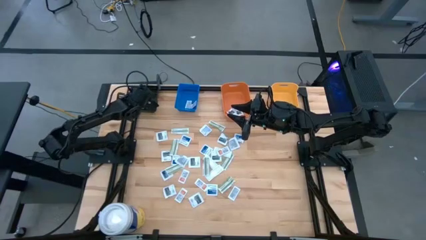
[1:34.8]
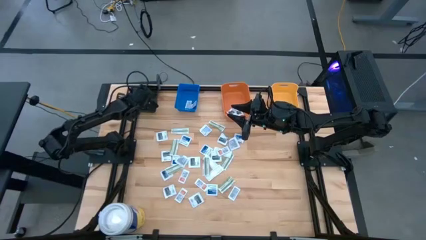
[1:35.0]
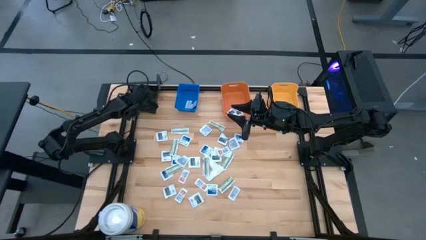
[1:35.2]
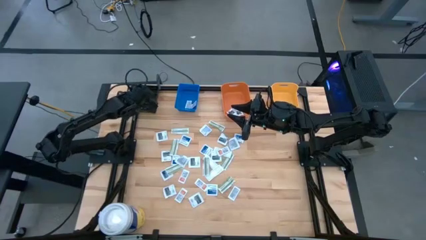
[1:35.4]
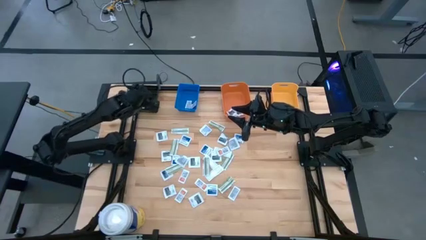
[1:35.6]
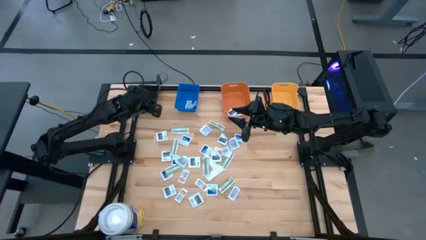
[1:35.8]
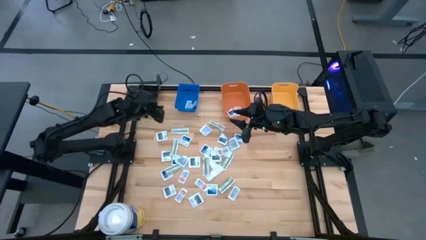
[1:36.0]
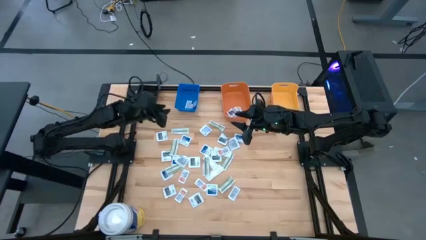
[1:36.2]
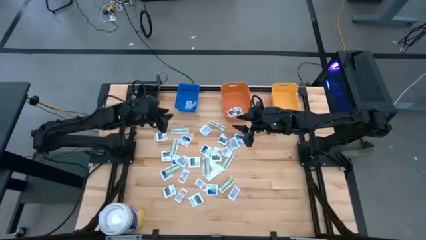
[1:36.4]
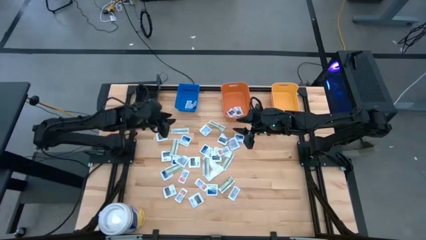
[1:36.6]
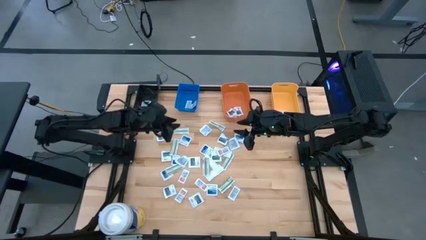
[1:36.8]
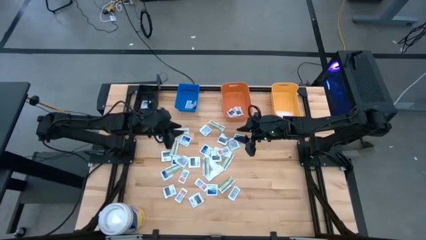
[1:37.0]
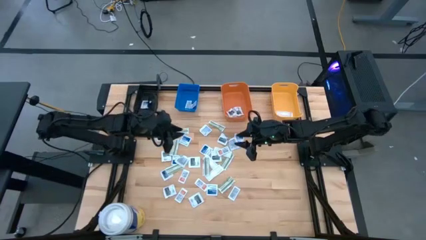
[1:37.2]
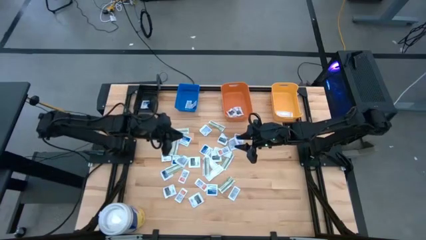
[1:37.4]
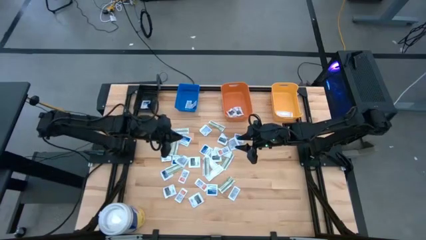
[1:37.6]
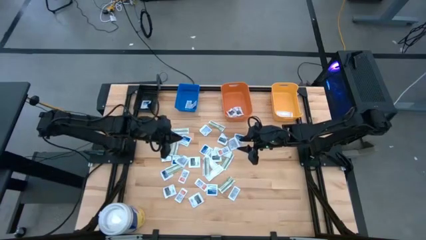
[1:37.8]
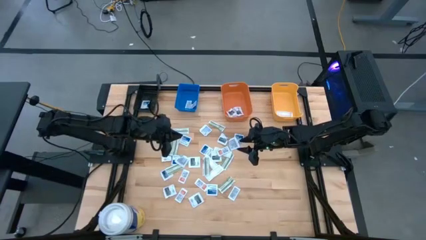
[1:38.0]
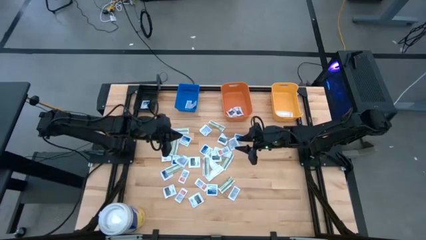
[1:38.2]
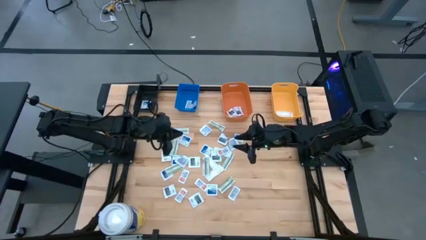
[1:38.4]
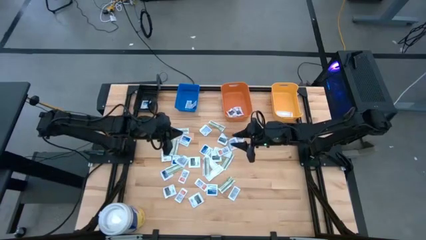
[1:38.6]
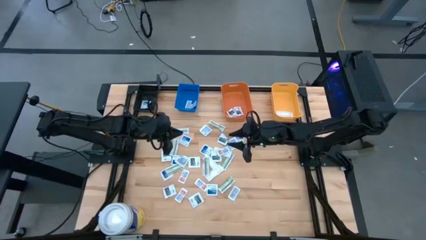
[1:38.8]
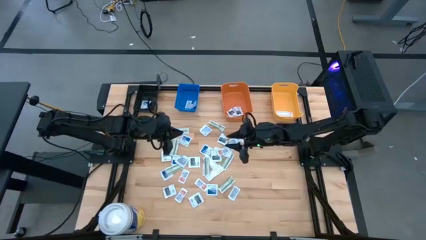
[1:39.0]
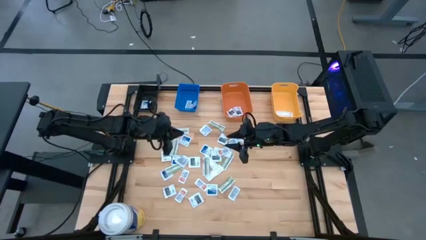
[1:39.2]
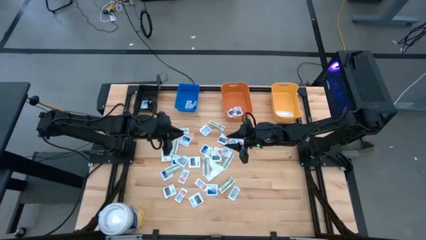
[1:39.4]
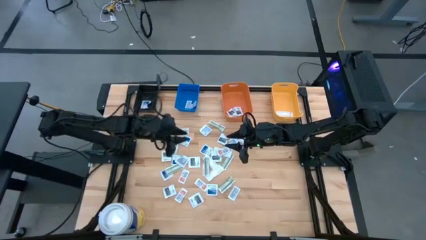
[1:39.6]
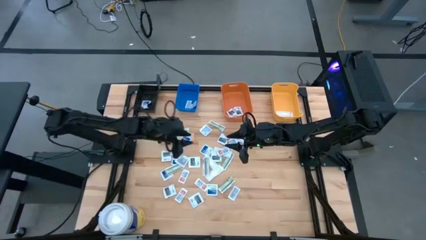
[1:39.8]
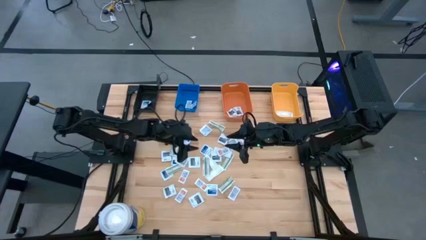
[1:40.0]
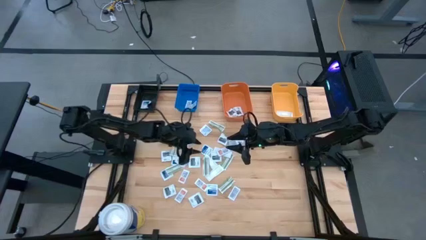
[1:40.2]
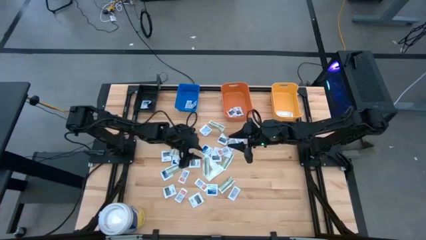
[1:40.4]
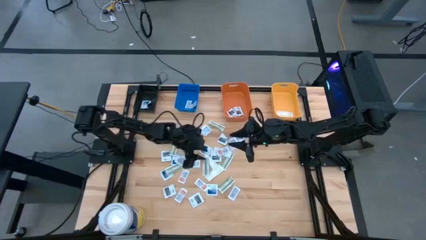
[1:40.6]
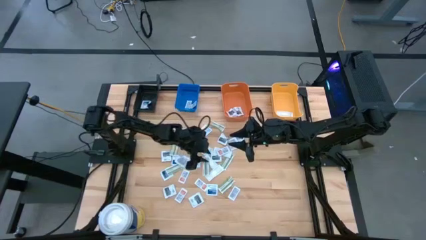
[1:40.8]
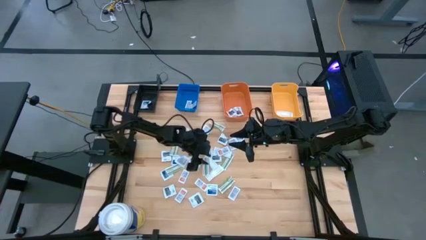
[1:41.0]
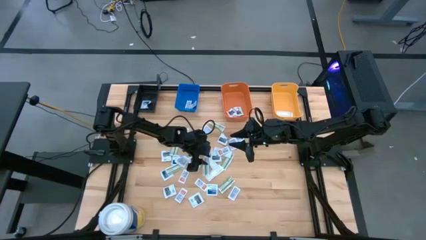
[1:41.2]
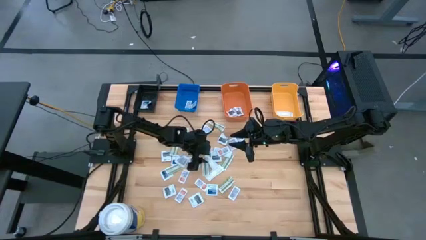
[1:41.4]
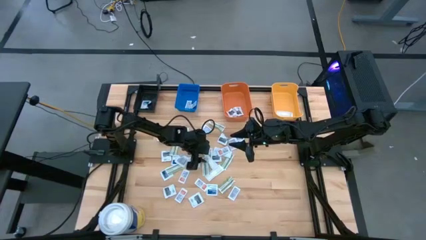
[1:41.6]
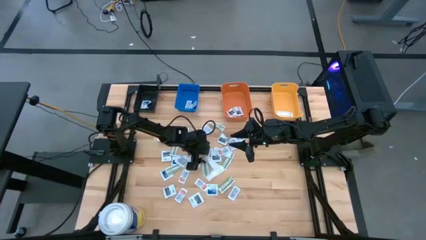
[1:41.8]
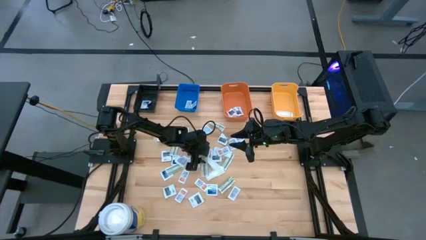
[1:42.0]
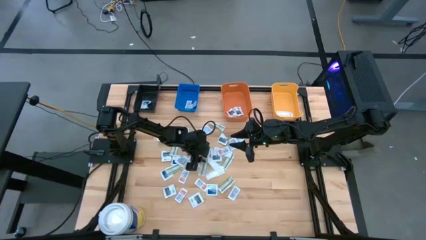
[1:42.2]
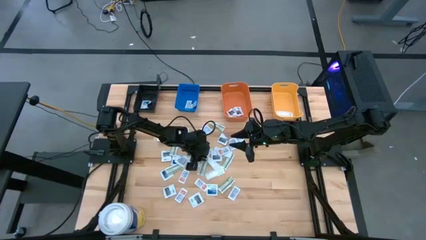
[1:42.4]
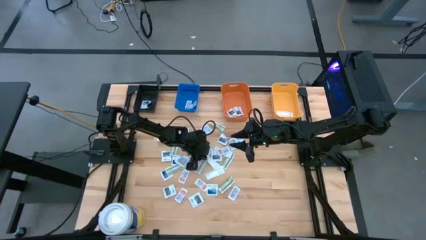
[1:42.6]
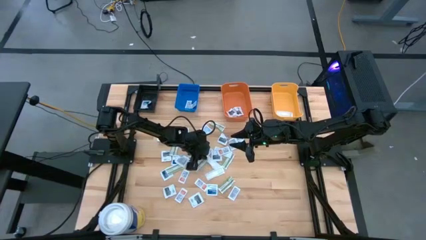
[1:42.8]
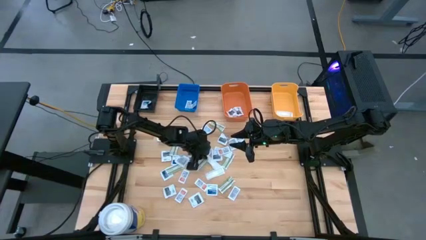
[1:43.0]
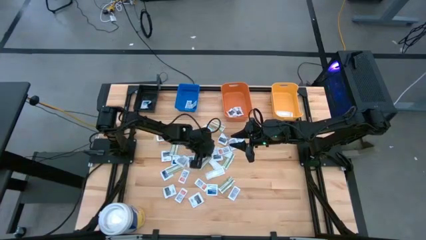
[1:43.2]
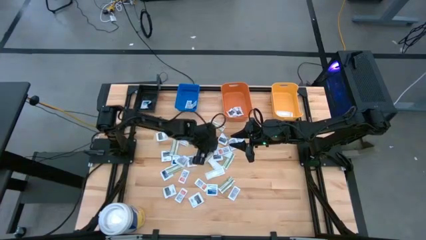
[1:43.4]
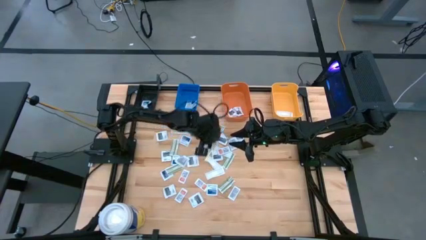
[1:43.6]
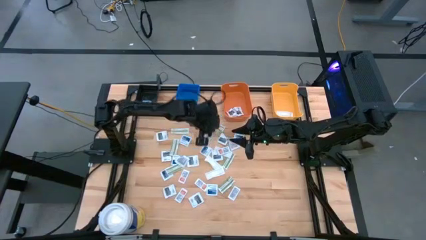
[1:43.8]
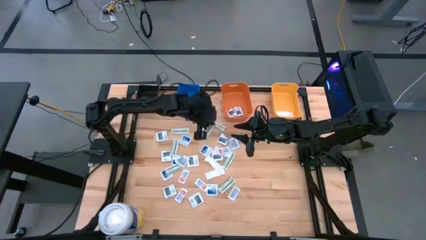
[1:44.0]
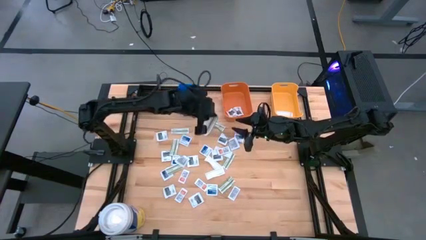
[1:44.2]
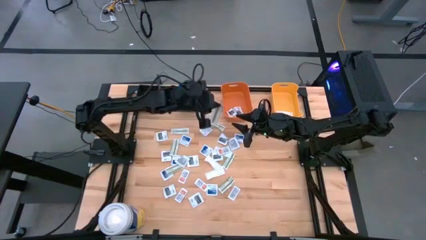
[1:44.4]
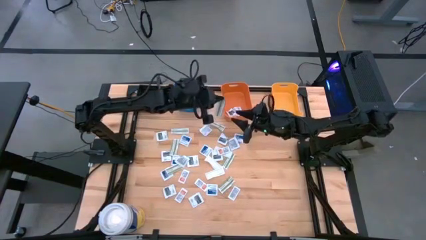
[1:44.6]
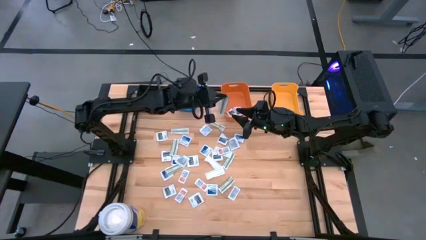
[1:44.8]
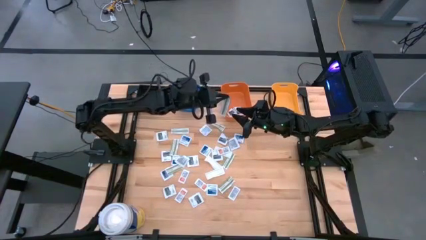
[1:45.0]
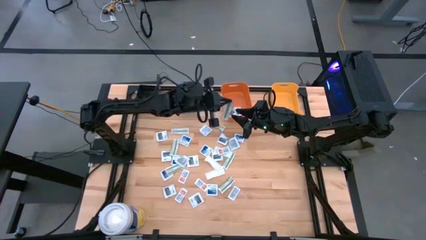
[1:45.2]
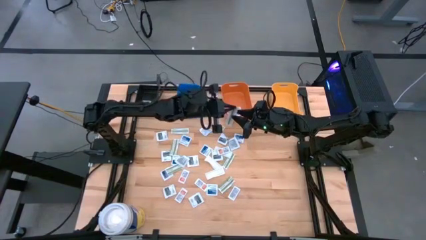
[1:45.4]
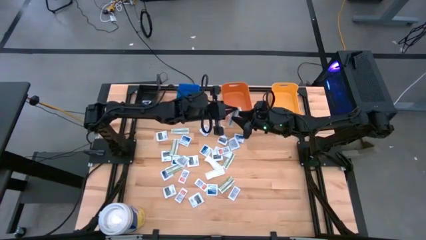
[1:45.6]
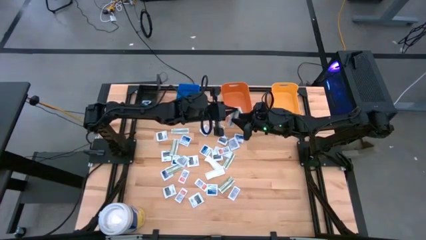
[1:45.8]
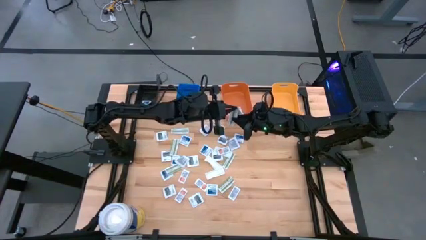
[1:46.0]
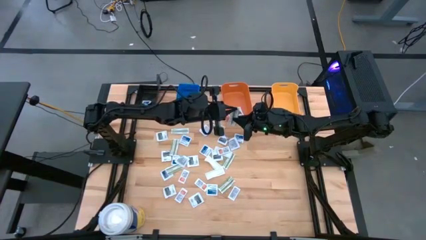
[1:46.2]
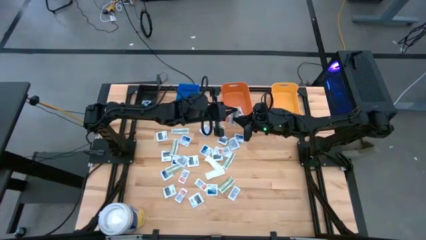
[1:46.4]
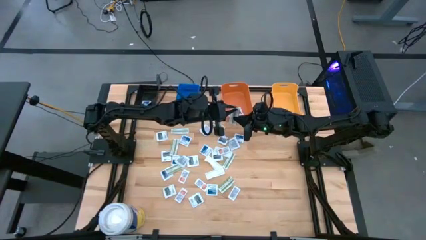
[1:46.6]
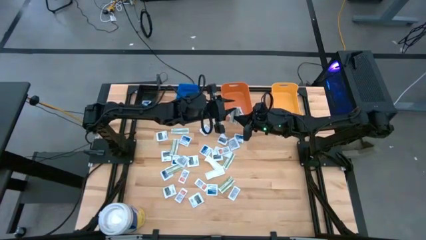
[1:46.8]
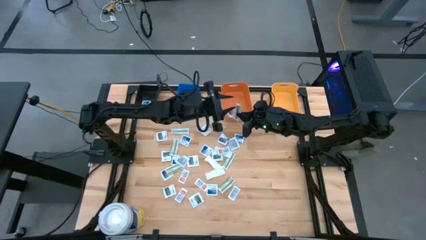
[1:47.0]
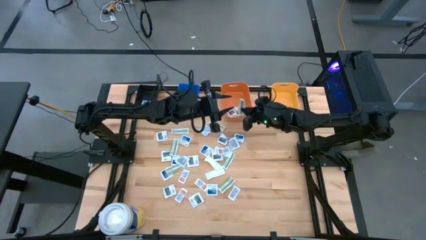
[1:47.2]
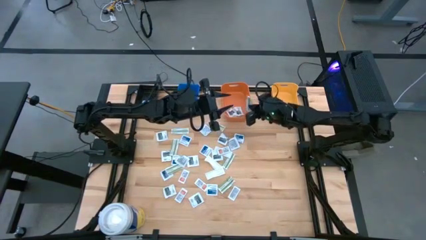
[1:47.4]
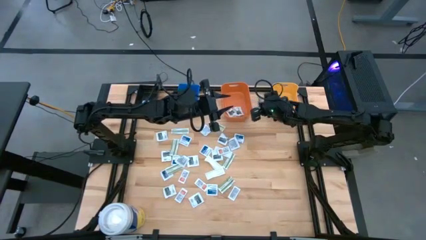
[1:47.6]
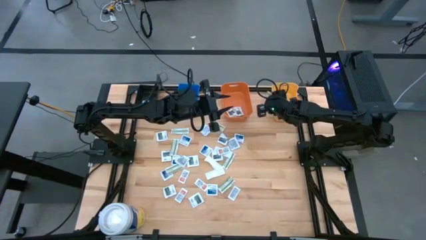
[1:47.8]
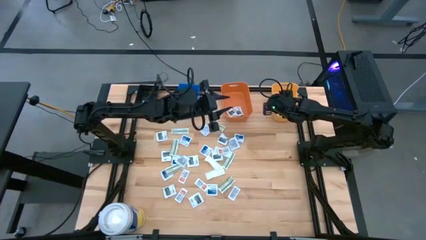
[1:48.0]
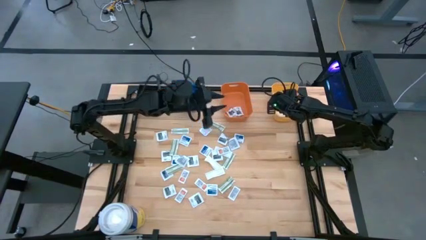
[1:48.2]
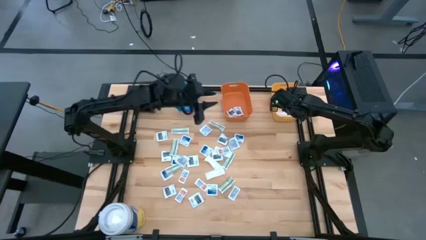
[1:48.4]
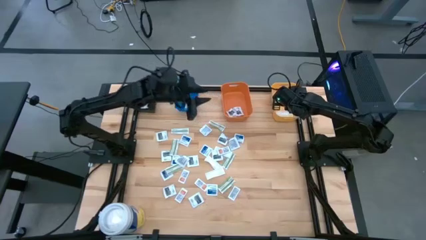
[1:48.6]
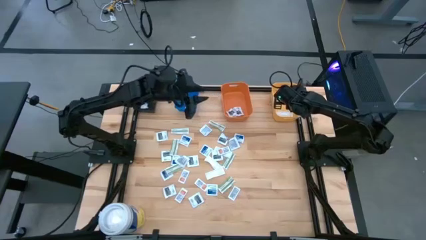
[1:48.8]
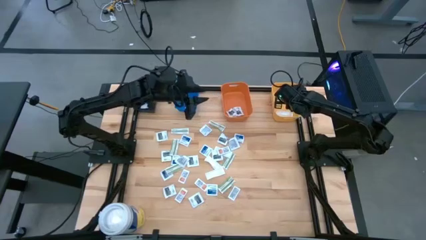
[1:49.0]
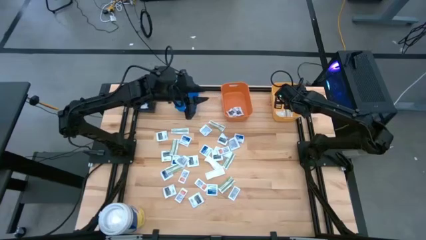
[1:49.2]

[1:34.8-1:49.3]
Task: Pick & Place First Aid Supplies
Put the bandage into the yellow bin

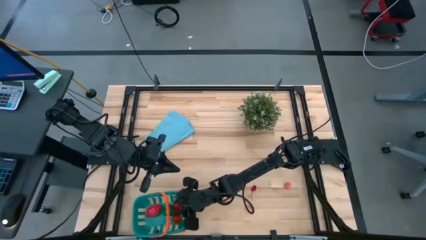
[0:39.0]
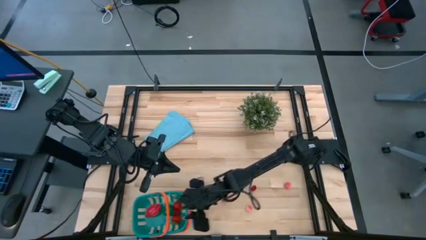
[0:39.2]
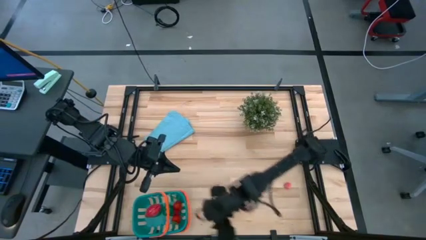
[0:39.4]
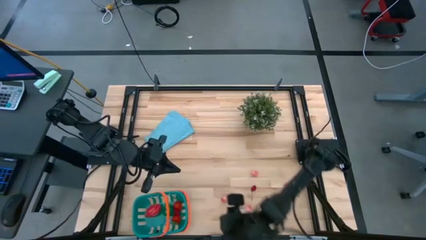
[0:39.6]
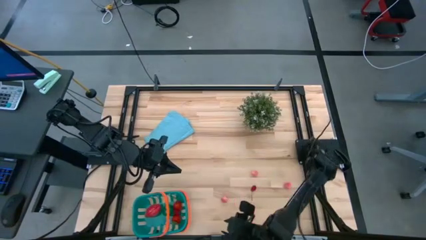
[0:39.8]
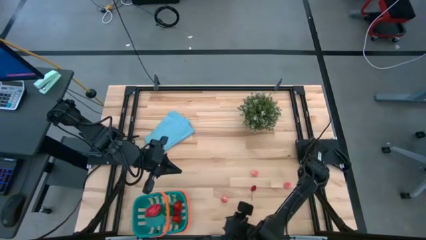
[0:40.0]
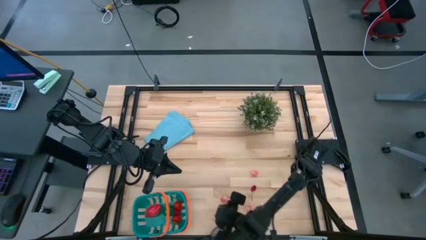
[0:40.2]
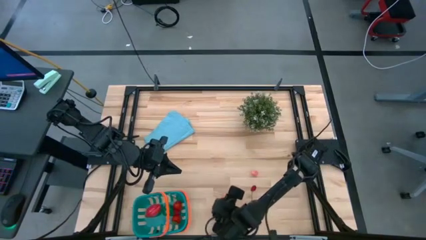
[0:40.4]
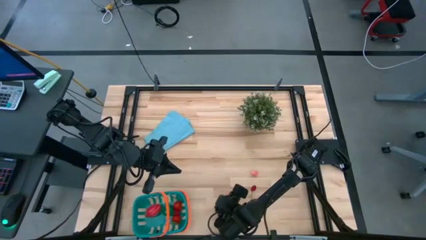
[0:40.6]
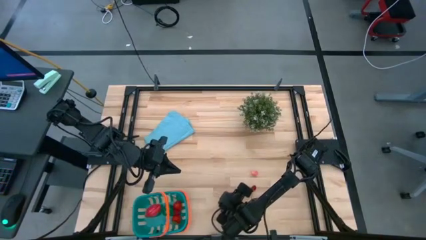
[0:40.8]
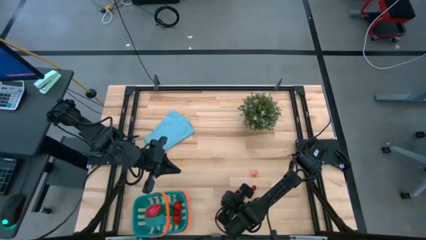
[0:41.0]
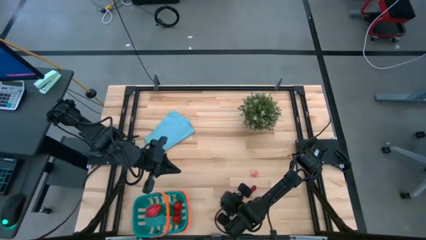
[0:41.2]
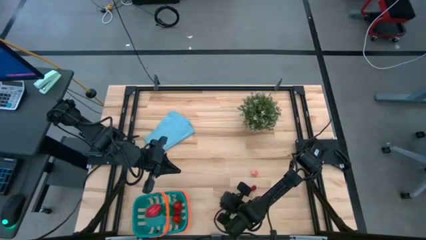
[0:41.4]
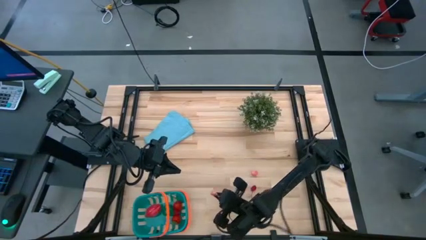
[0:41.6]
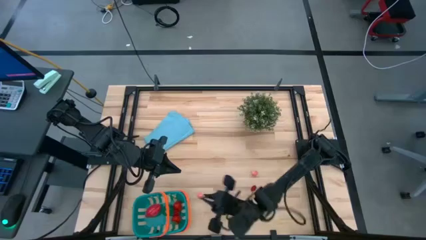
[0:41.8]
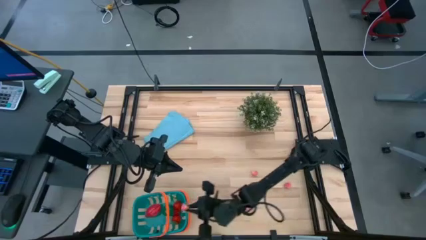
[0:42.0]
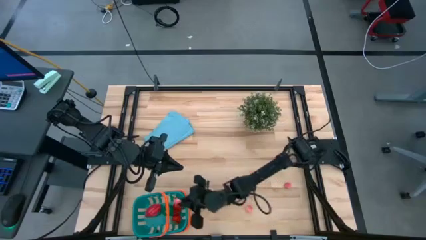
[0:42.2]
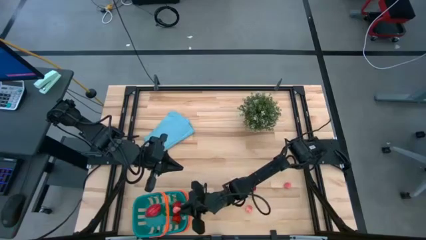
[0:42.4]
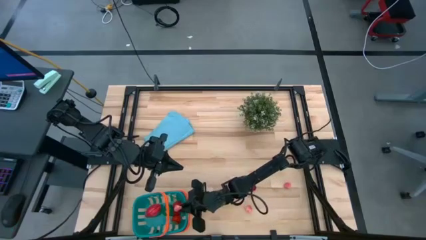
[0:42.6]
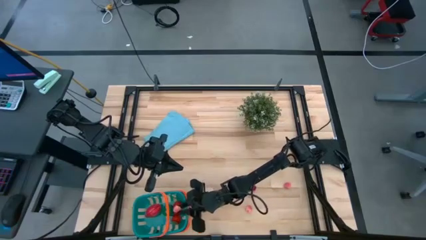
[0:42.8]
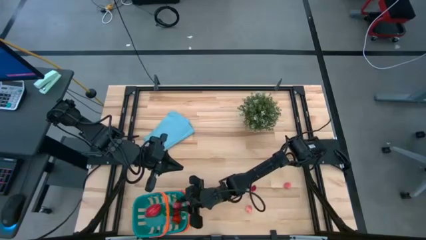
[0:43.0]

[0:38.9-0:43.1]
Task: Pick and placing Produce into tupperware
Put the pink peach into the blue basket
